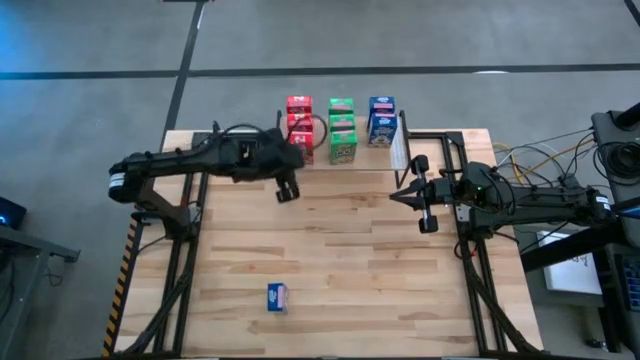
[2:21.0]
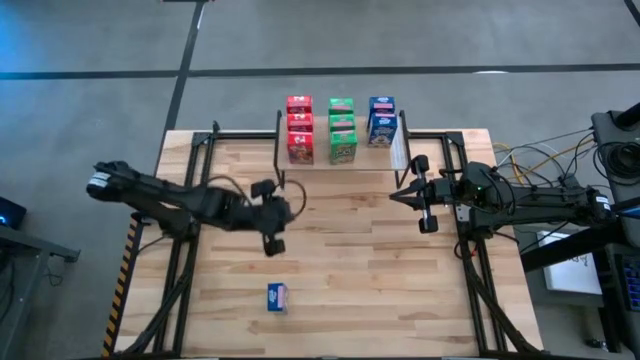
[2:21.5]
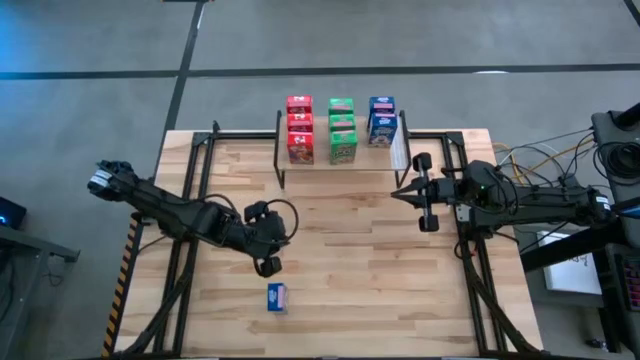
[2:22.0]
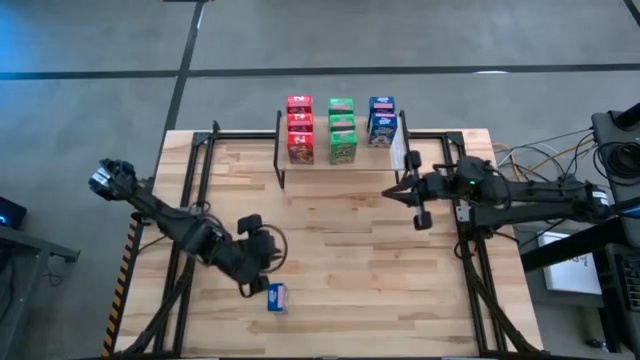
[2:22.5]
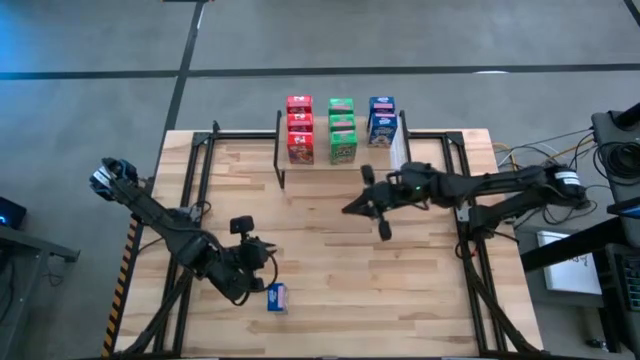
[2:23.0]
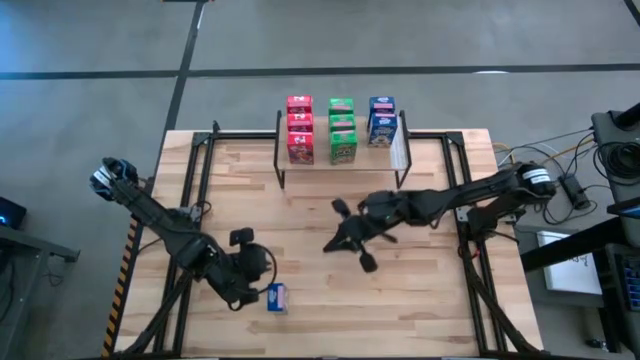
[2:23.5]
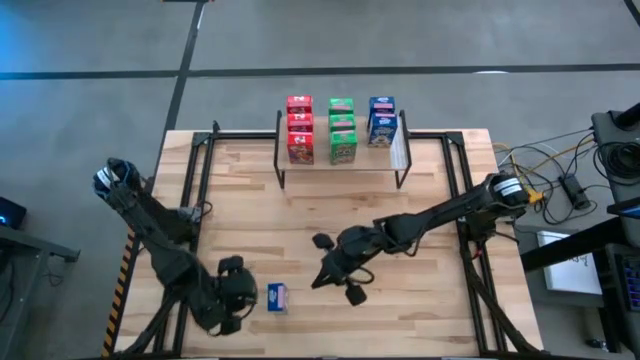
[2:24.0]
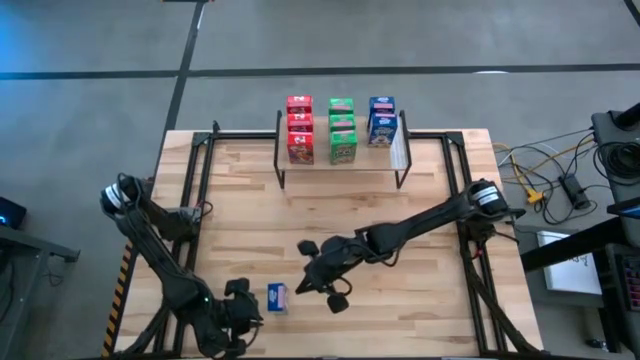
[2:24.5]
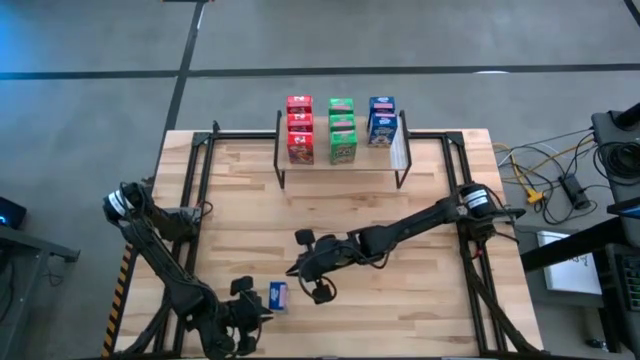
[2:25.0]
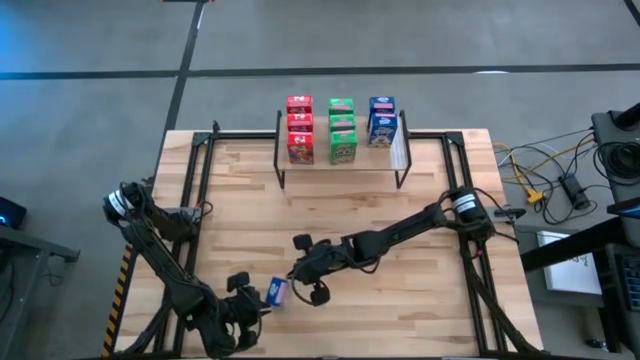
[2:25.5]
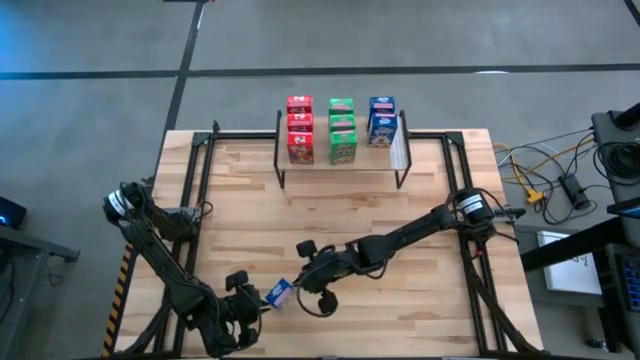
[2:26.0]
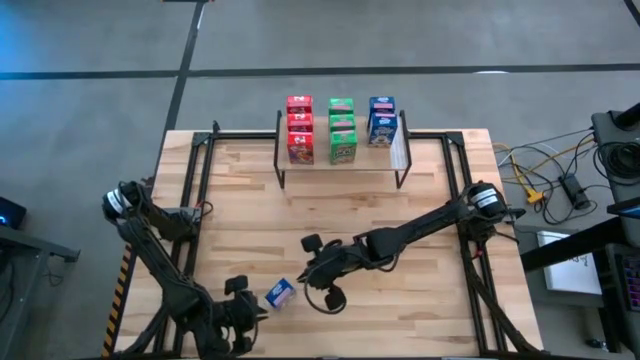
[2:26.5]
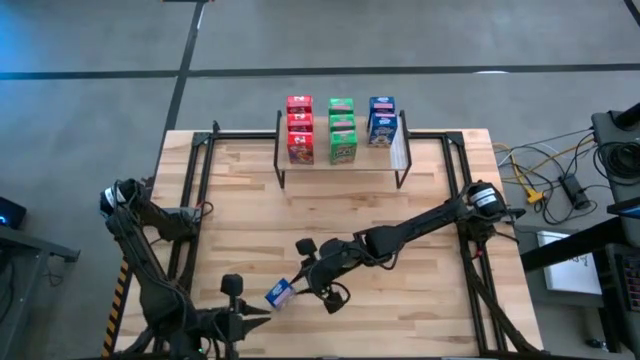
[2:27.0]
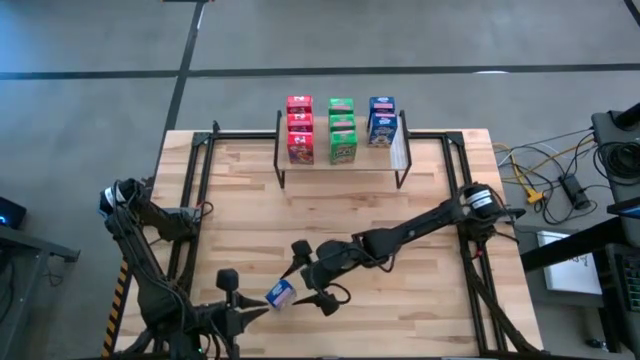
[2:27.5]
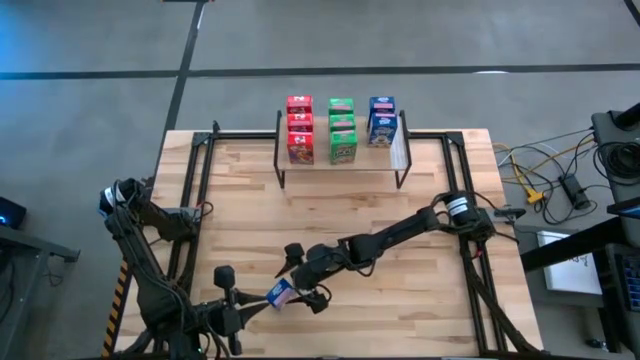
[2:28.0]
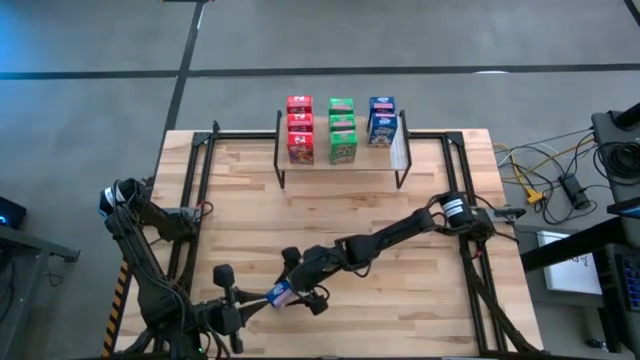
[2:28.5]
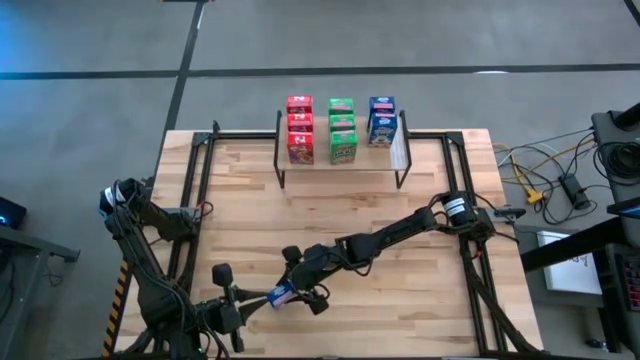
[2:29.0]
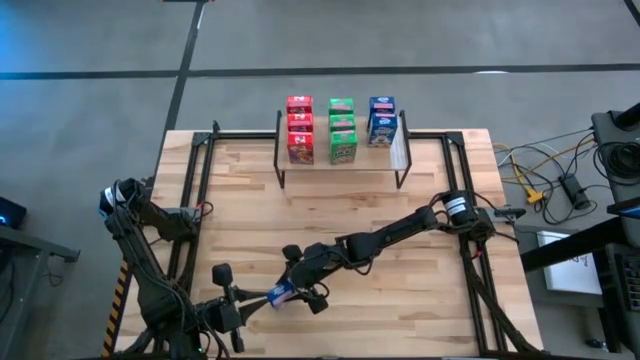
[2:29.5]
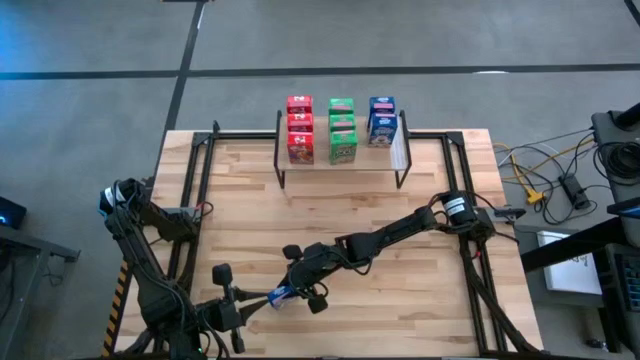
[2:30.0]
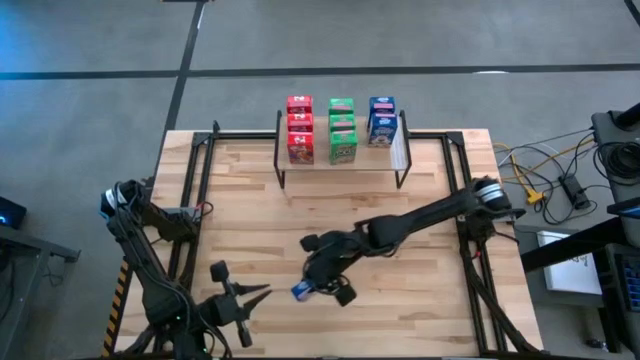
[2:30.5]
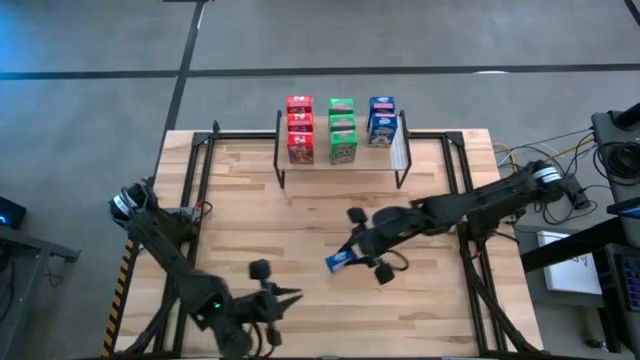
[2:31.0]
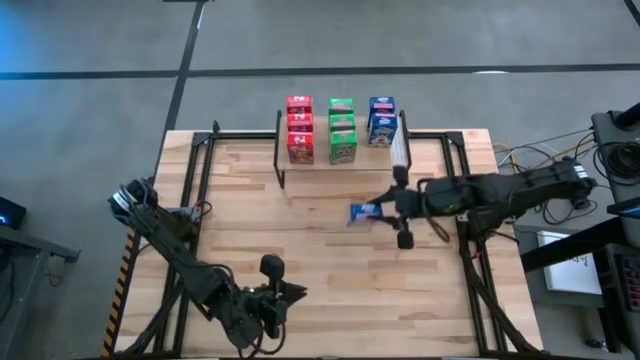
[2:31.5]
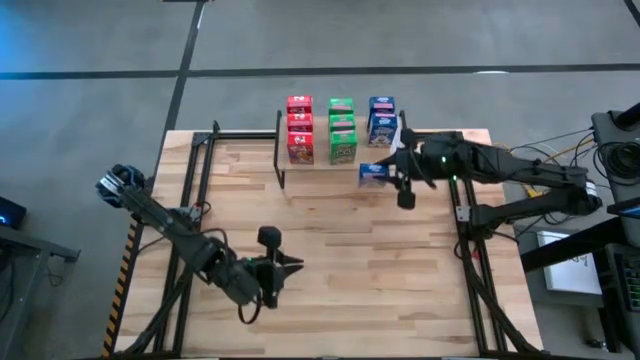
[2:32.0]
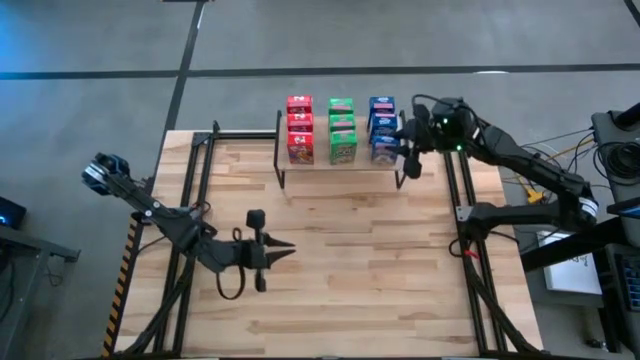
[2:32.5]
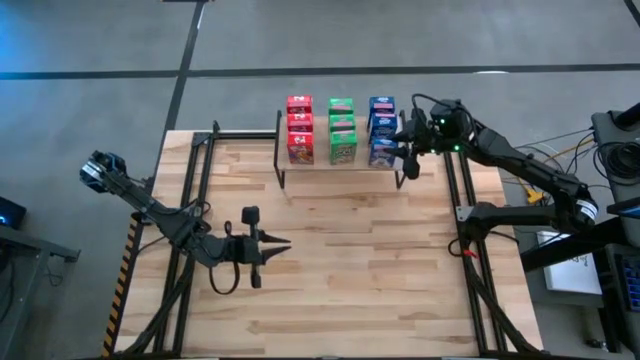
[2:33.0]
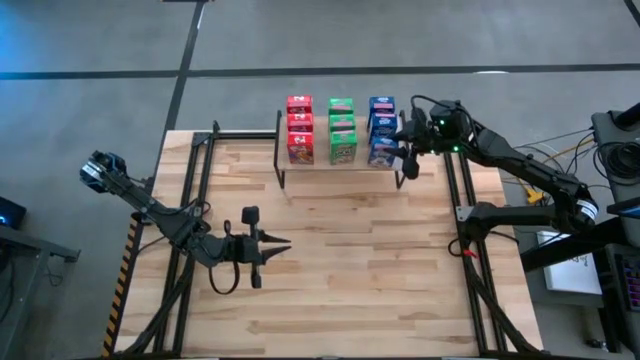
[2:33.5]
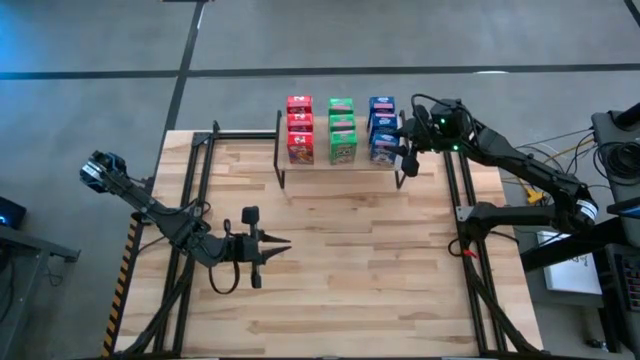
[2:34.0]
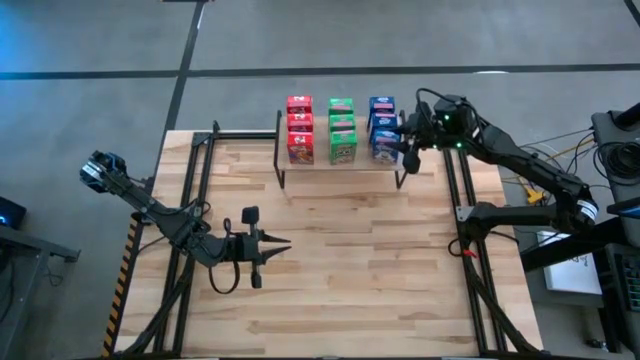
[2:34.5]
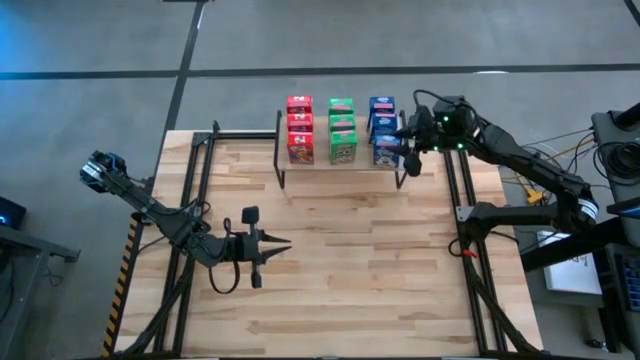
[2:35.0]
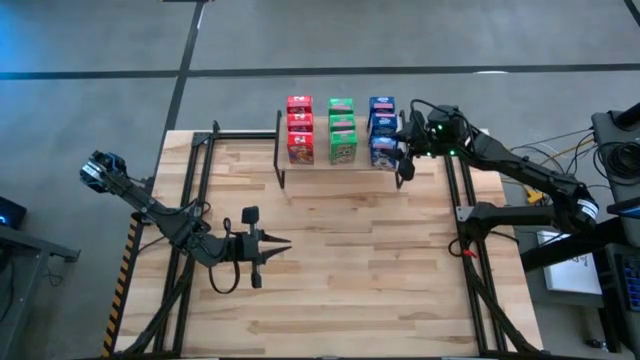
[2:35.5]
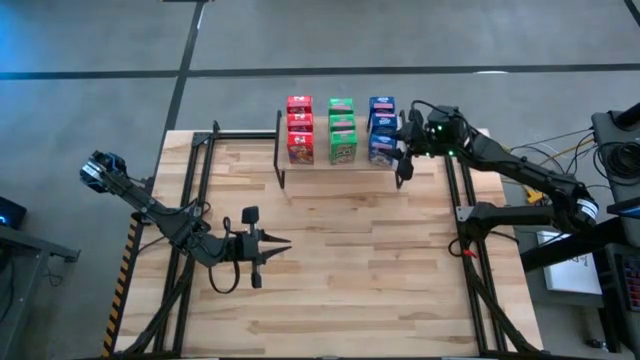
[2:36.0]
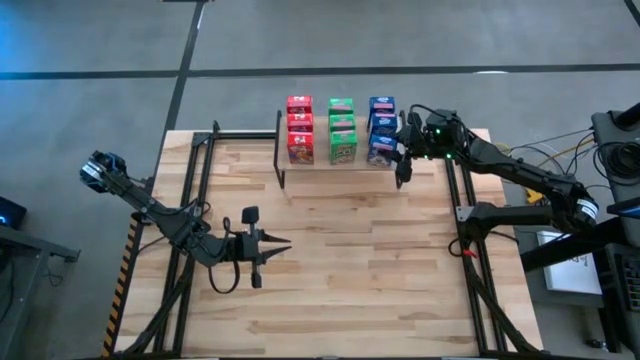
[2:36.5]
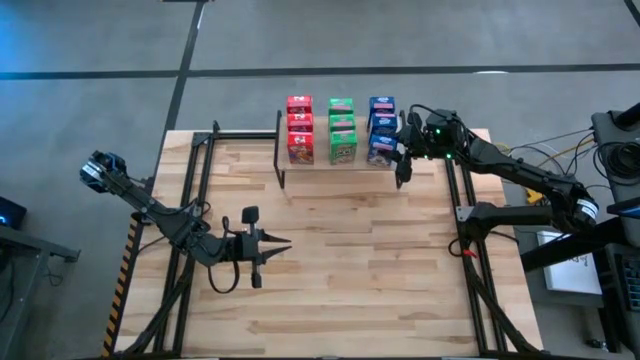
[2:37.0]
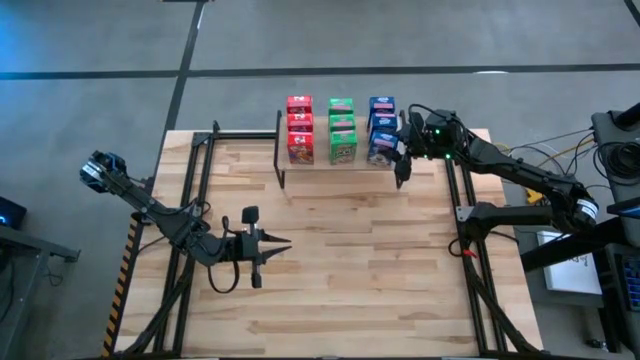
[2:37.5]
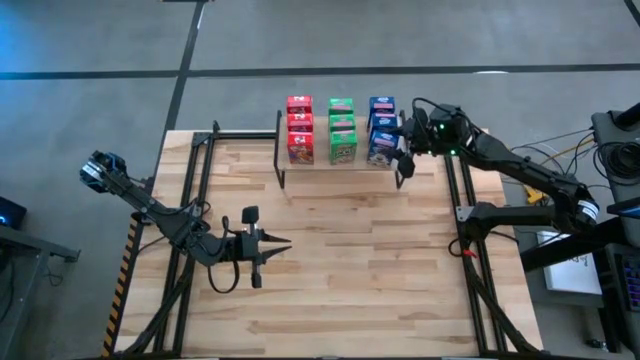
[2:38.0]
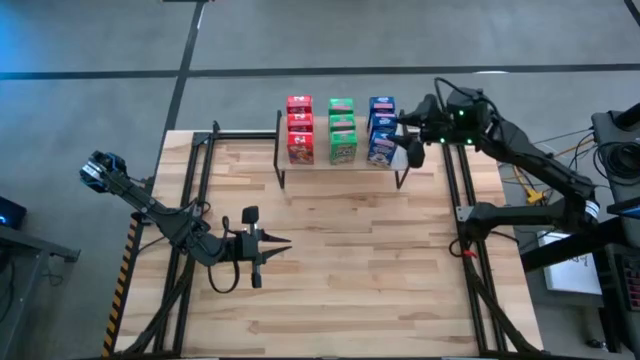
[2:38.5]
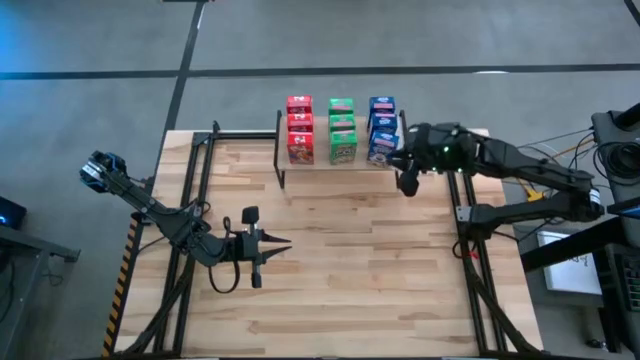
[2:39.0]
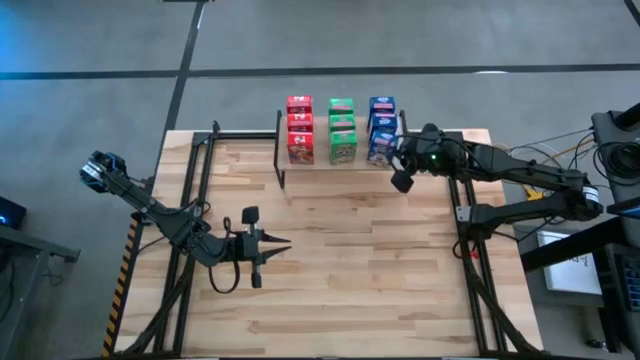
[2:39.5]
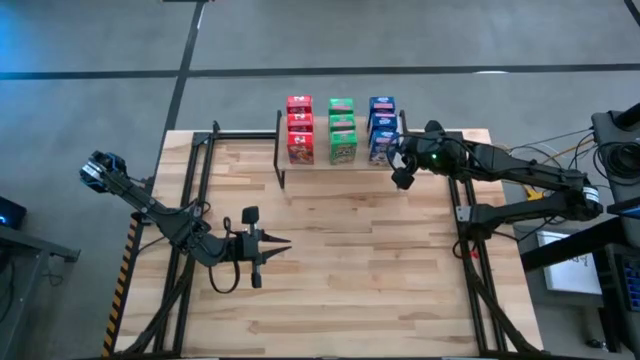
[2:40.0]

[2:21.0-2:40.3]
Task: Stack cereal on shelf
Put the blue cereal box on the shelf

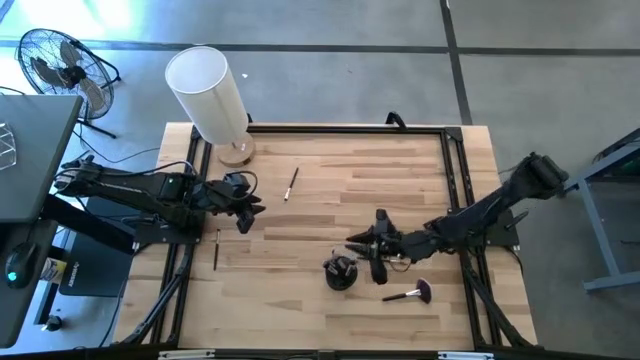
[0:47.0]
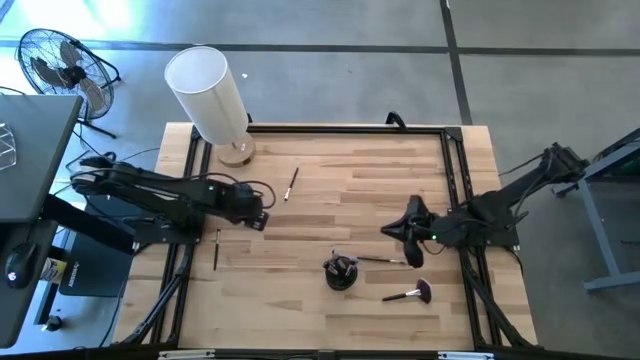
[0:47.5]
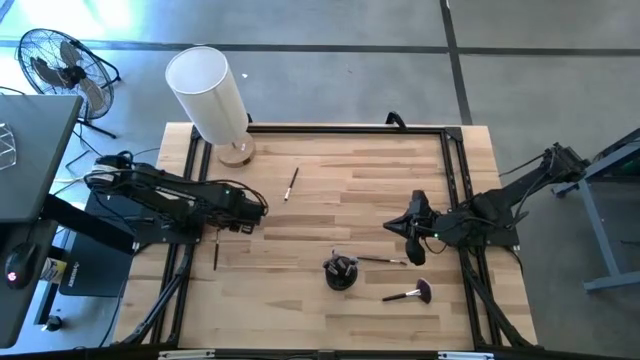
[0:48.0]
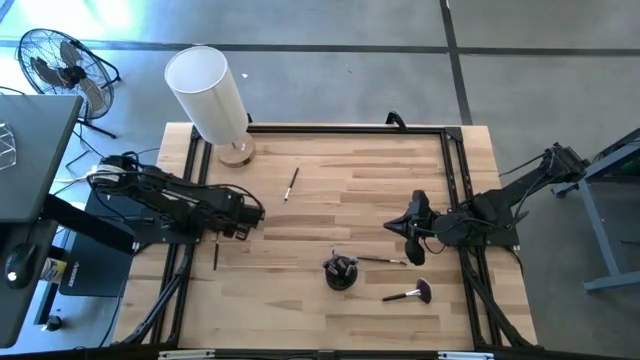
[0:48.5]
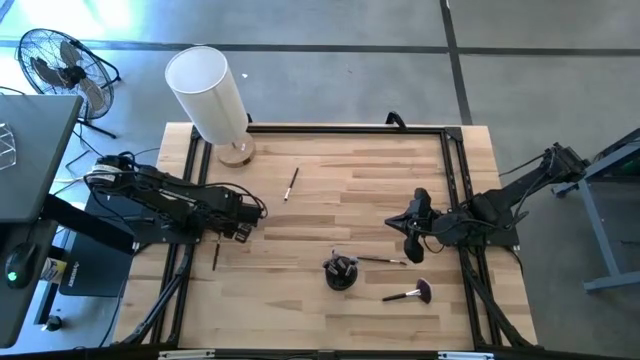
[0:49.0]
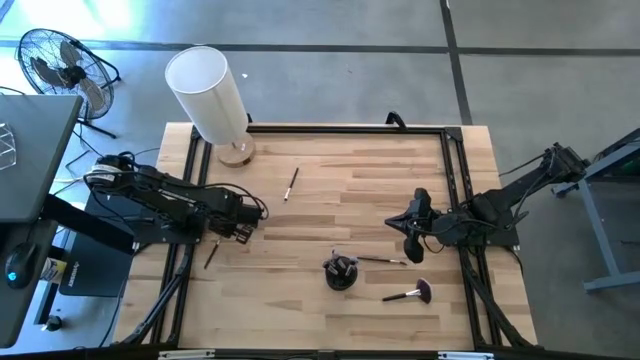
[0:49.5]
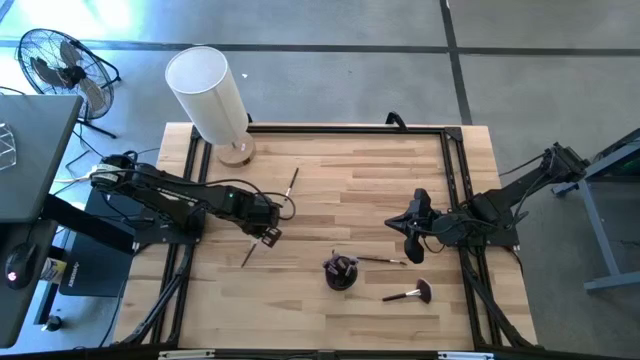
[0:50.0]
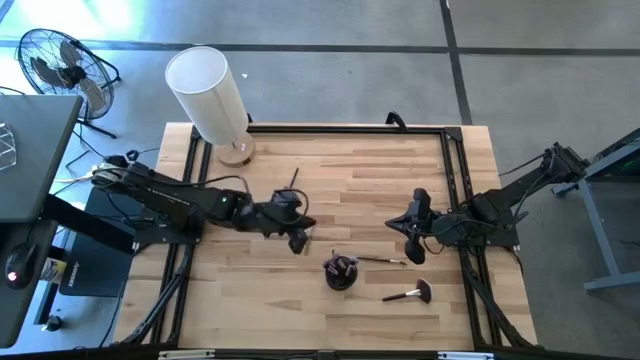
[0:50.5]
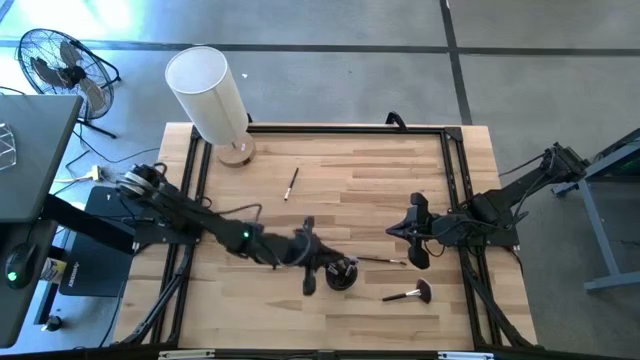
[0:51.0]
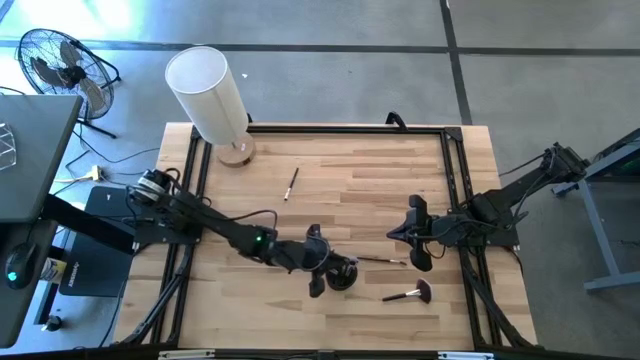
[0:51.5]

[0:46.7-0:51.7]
Task: Pick & Place Makeup Supplies
Put the makeup brush into the black makeup holder
